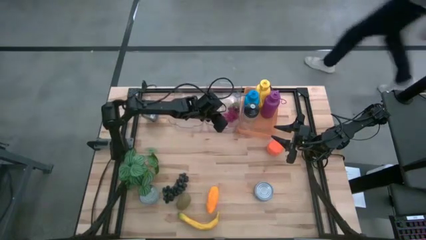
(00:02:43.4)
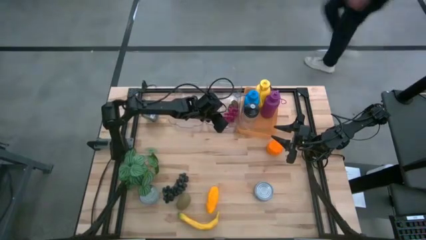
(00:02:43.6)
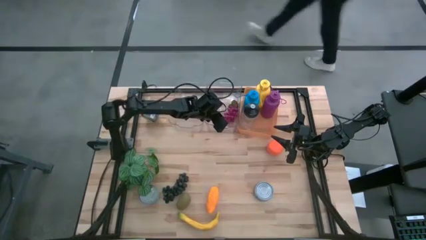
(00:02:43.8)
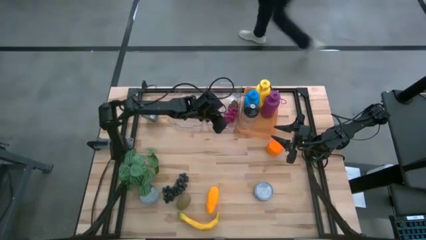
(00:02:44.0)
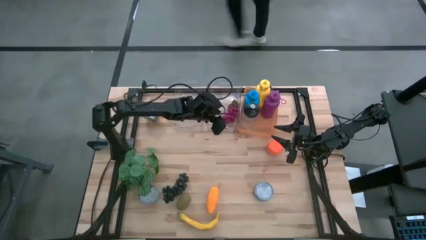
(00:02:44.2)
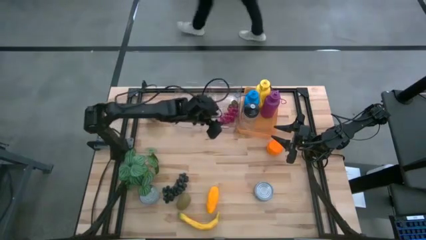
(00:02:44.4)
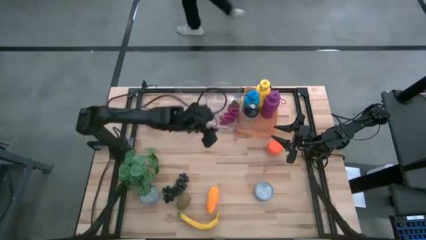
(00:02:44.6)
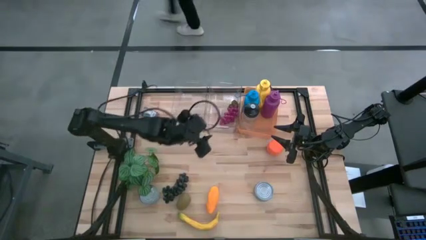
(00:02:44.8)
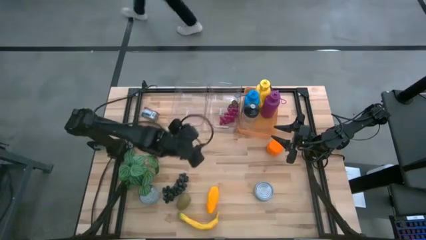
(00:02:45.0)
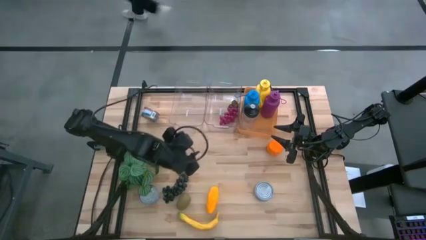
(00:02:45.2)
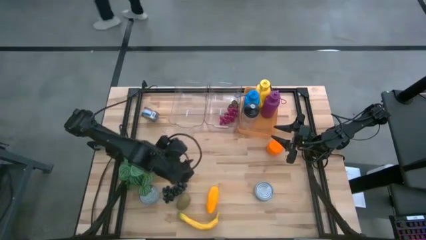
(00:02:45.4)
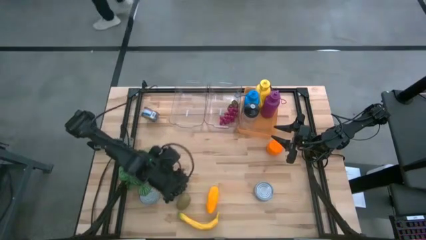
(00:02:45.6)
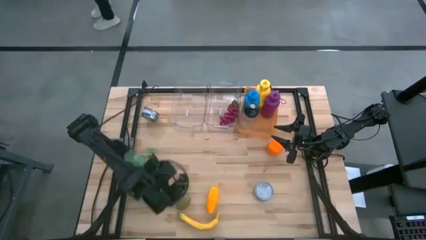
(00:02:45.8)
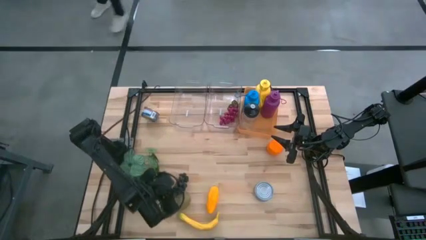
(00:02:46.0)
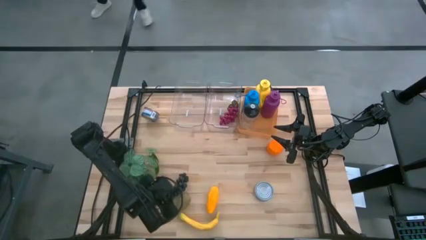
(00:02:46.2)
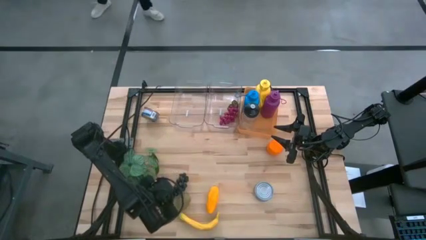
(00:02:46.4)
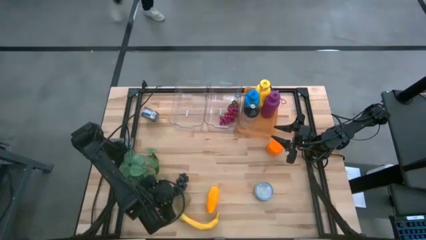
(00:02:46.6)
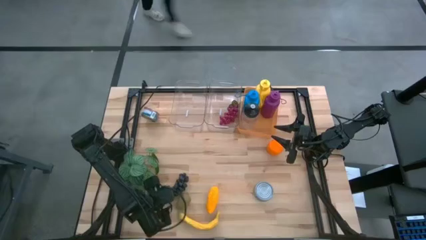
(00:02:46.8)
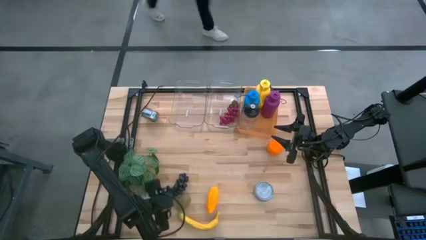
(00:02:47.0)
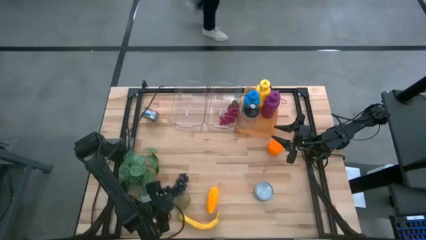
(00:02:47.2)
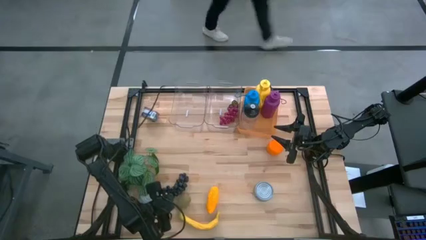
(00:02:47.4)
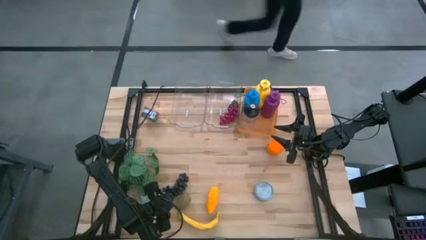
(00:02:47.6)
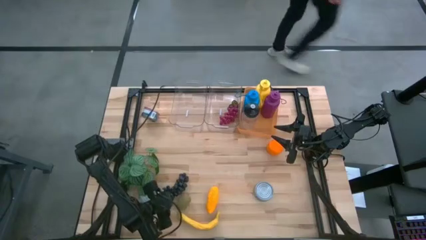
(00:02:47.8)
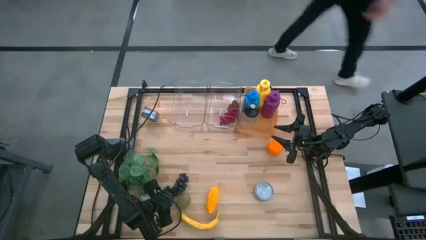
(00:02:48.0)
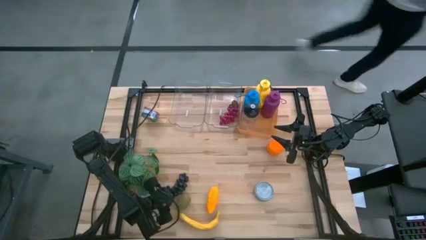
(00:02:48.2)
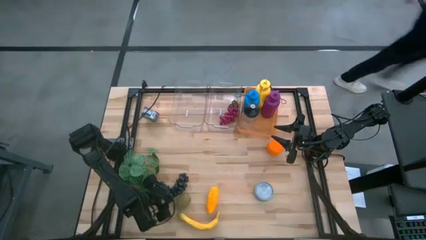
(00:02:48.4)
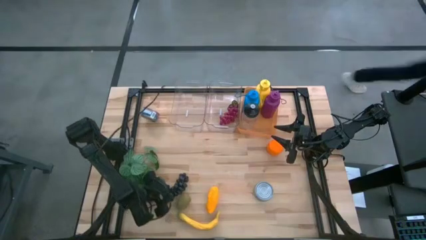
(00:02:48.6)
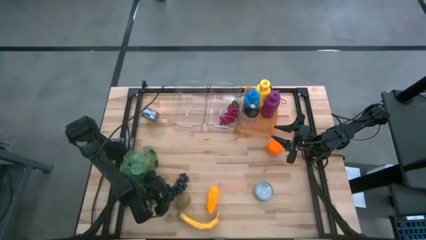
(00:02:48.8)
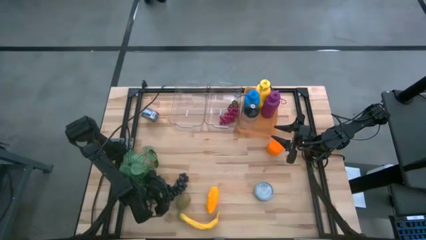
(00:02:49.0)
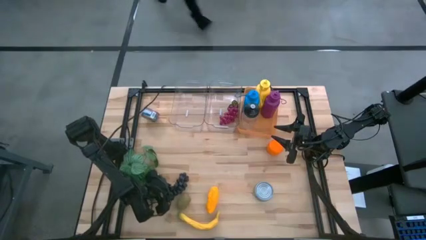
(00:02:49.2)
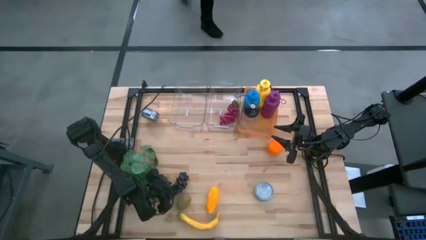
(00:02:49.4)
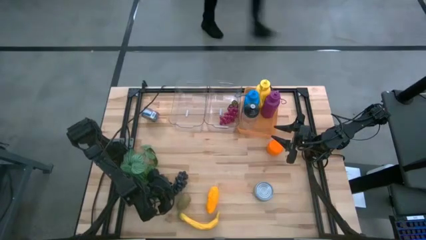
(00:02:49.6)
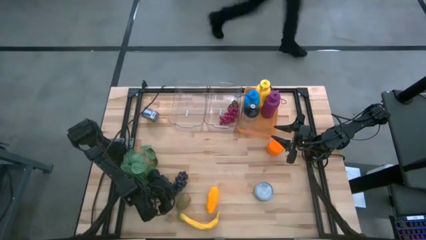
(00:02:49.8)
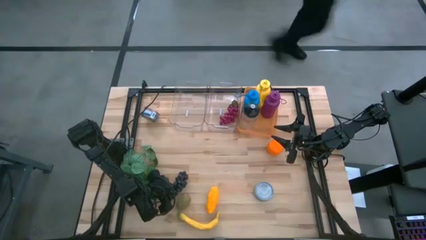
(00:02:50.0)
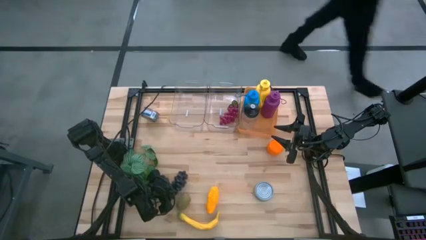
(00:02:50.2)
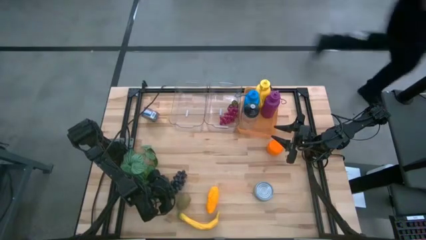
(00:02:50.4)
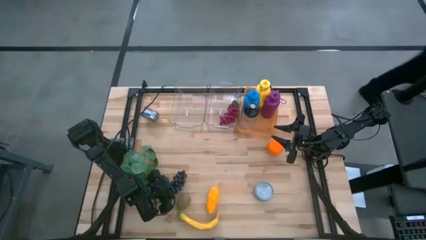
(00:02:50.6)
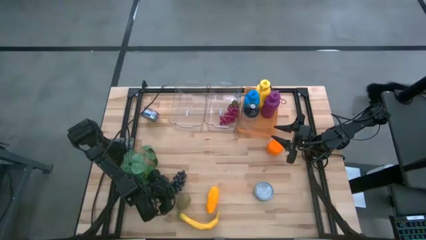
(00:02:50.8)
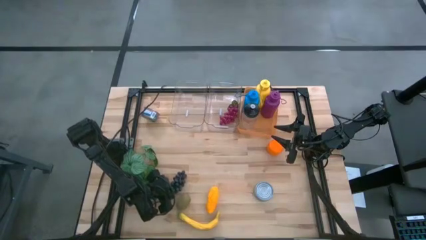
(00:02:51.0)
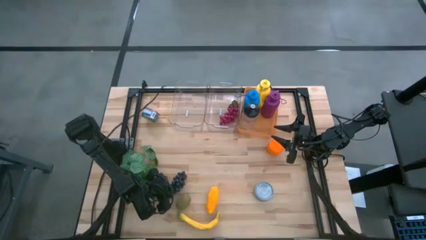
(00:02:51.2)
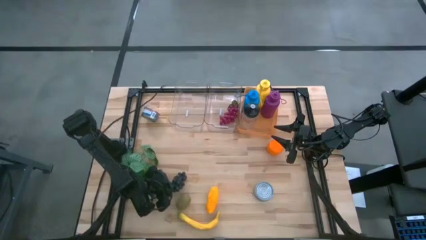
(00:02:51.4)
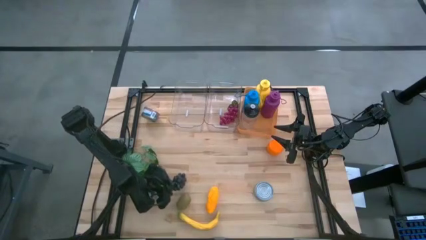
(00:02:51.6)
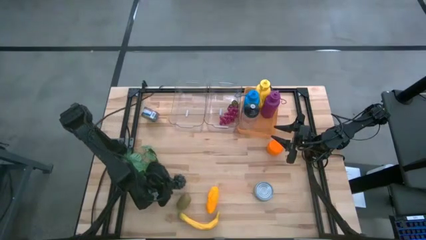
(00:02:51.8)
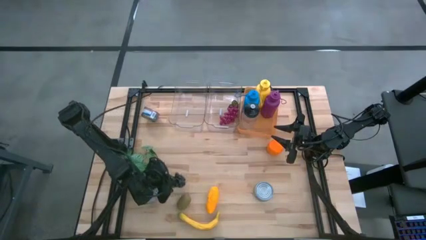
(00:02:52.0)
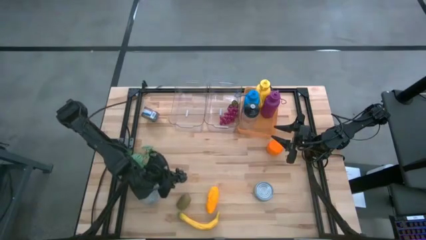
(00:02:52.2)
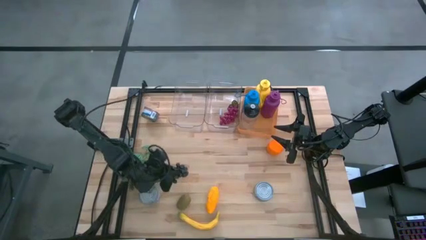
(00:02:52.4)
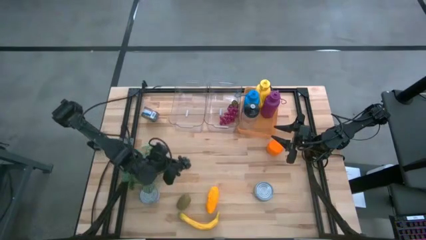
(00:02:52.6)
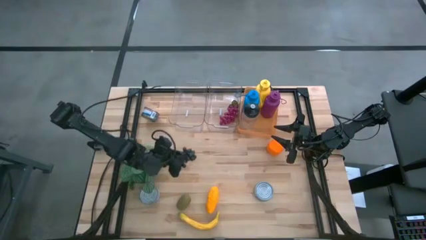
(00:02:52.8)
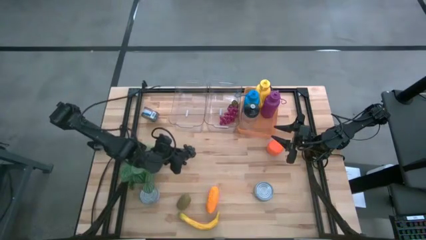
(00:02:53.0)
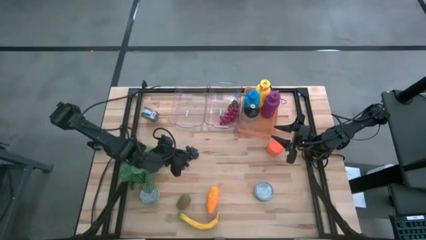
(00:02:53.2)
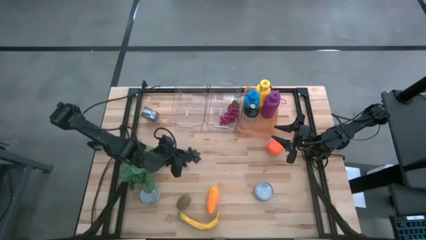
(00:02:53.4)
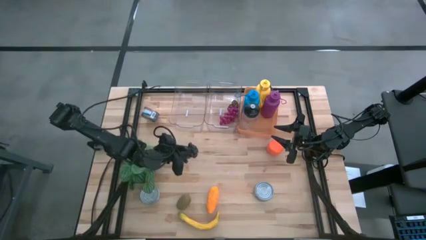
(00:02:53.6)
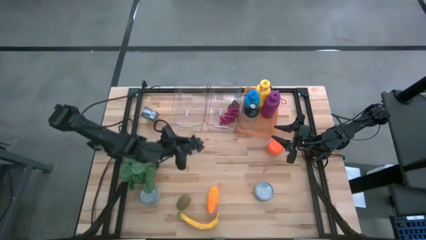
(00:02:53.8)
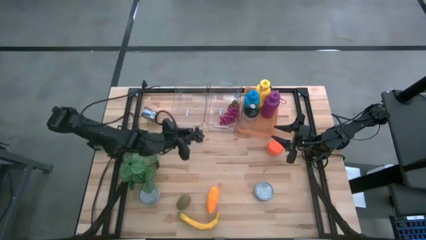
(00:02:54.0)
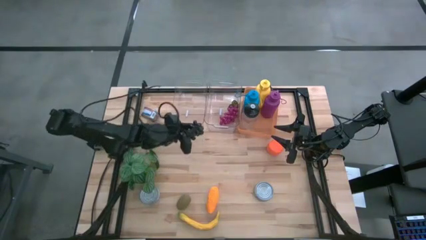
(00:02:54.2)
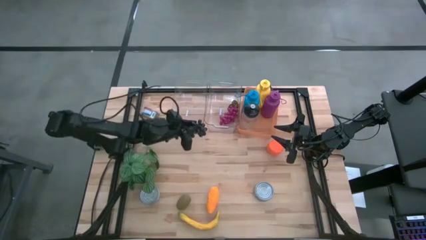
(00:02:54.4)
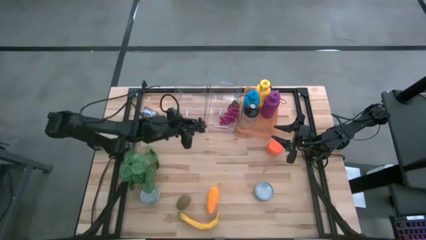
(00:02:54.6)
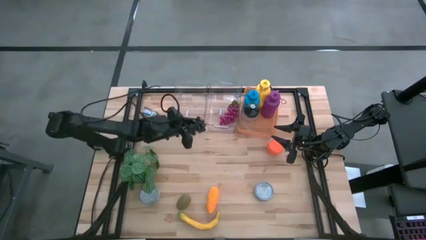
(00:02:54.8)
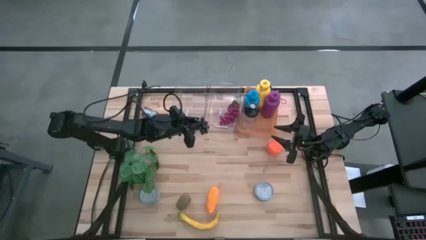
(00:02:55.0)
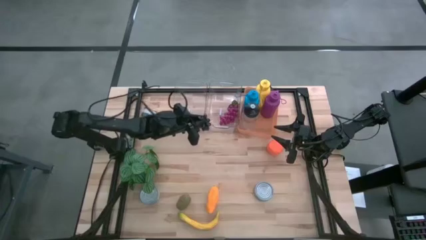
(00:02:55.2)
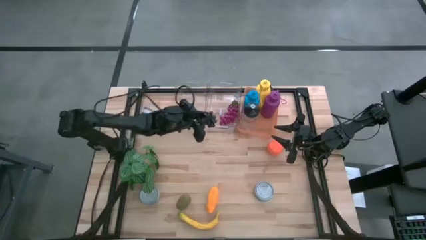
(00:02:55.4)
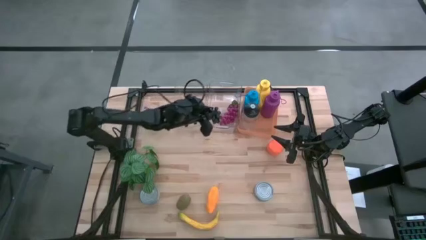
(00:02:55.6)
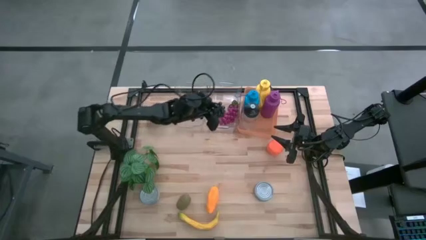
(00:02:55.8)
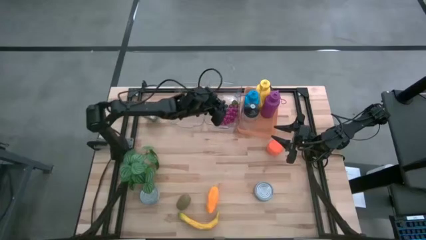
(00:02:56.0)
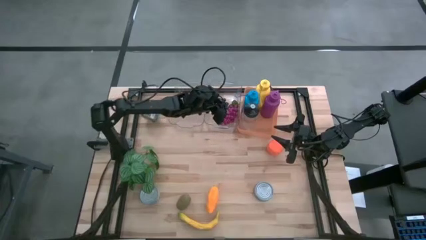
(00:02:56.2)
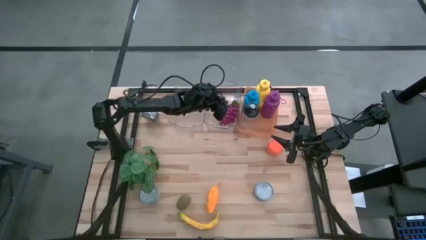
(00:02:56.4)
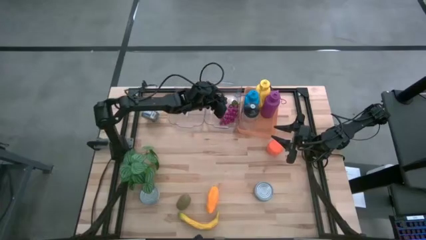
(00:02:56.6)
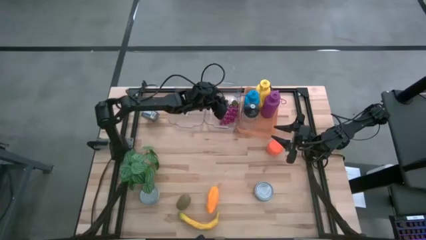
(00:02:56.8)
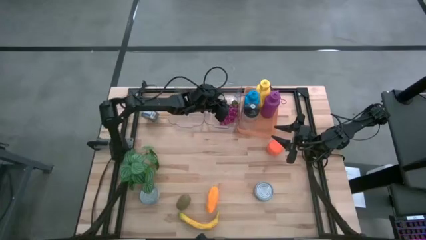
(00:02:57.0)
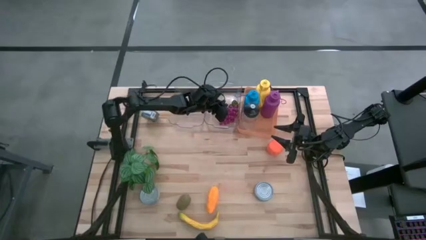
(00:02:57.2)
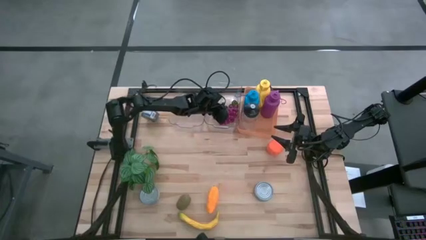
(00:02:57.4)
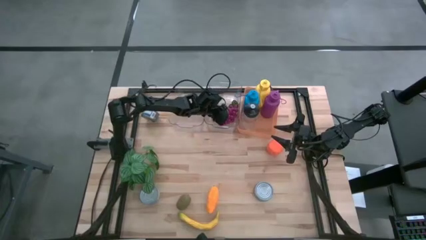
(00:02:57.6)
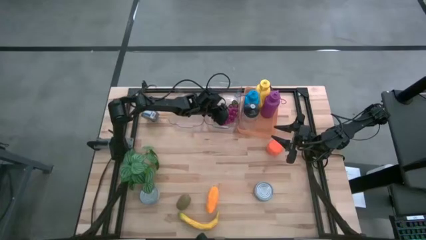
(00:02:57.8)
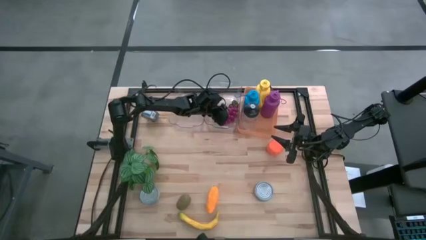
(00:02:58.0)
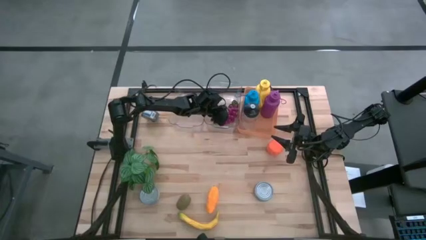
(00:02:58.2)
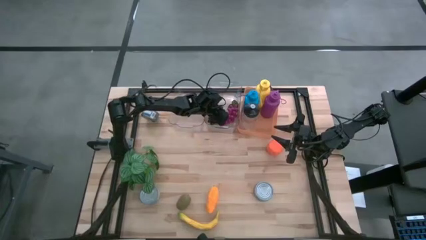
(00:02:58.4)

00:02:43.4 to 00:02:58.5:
Task: Pick & Place Food Item
Put the black grapes into the right transparent bin
